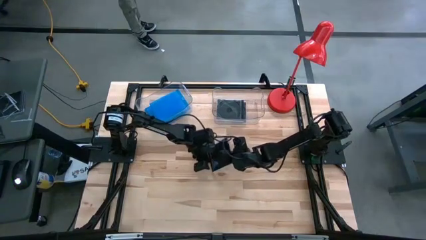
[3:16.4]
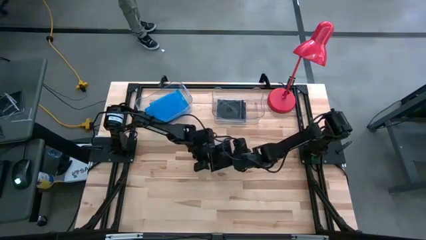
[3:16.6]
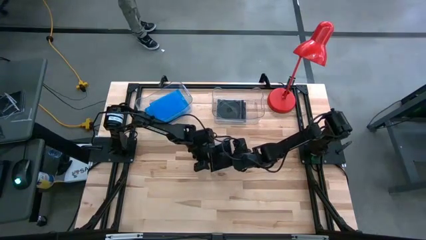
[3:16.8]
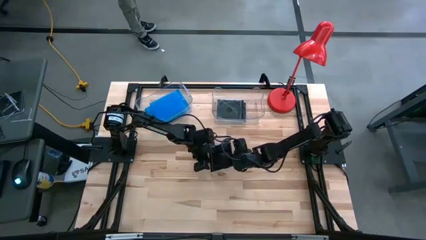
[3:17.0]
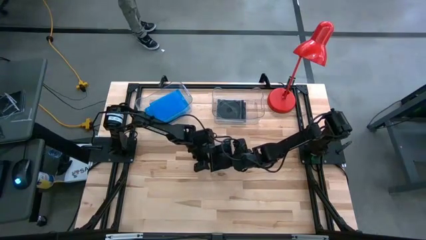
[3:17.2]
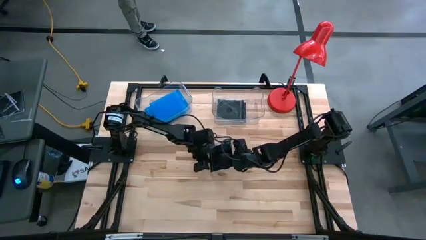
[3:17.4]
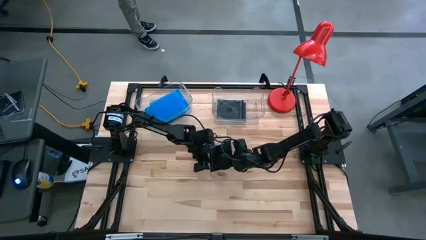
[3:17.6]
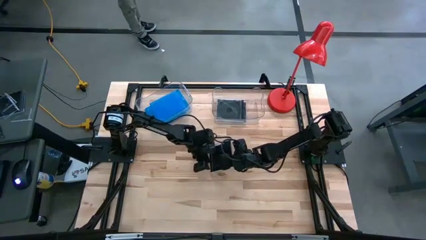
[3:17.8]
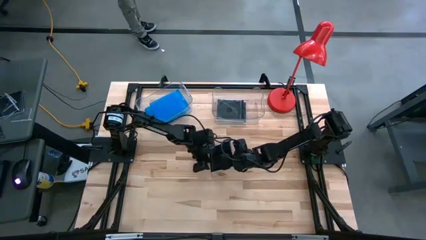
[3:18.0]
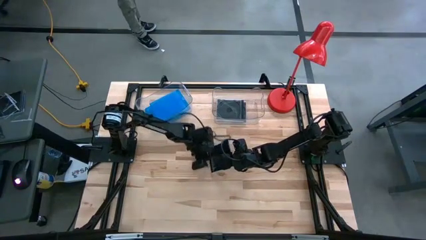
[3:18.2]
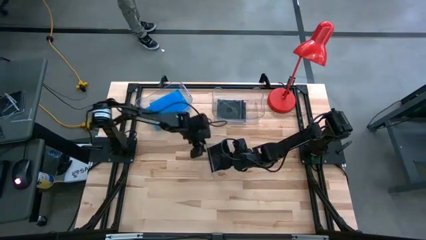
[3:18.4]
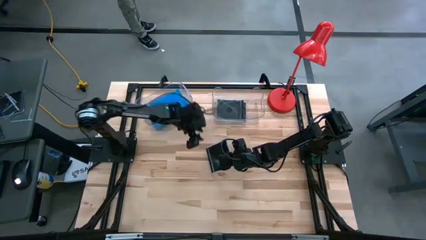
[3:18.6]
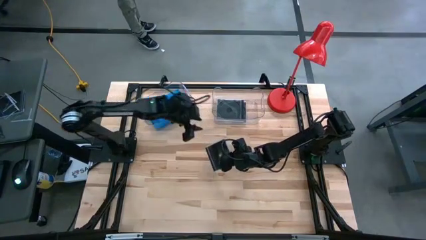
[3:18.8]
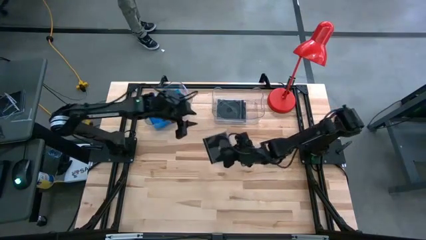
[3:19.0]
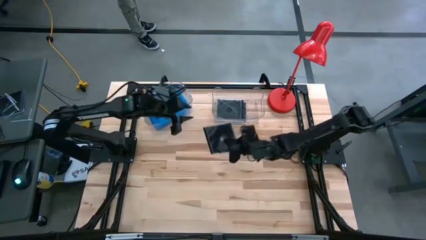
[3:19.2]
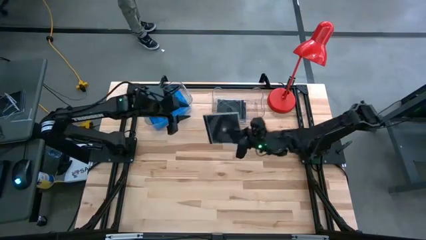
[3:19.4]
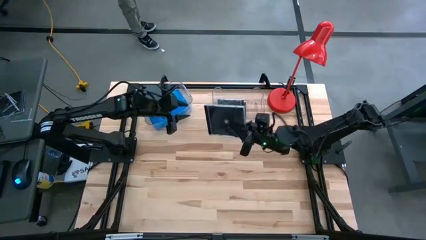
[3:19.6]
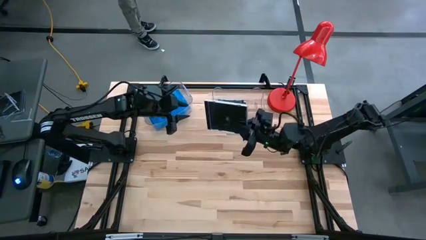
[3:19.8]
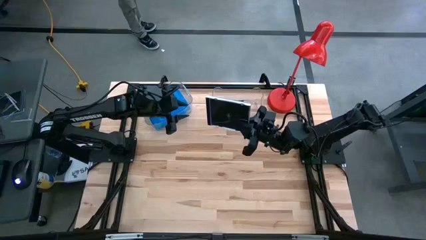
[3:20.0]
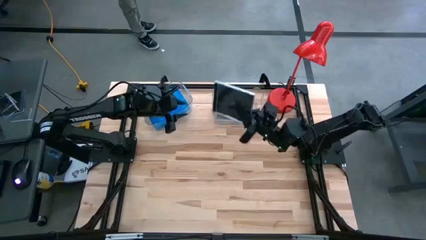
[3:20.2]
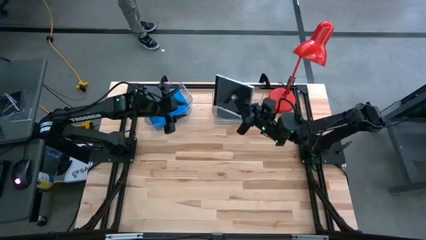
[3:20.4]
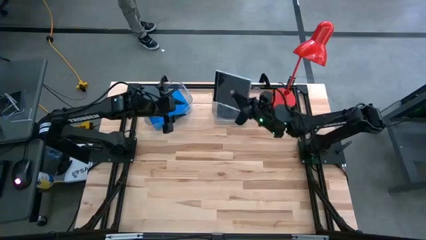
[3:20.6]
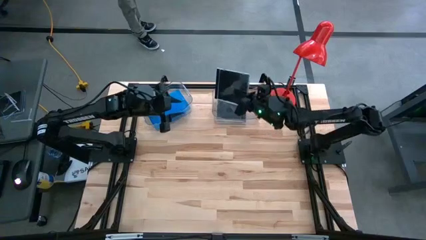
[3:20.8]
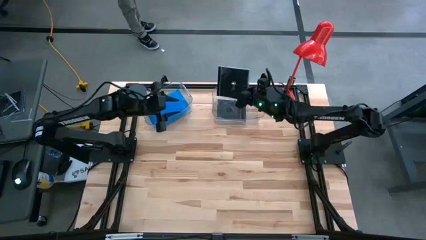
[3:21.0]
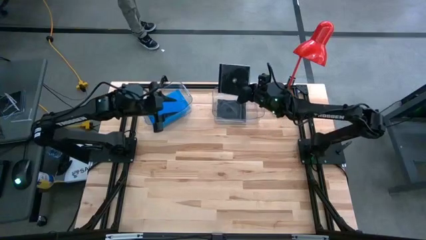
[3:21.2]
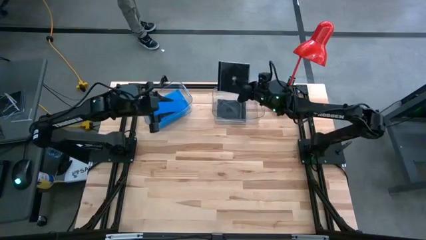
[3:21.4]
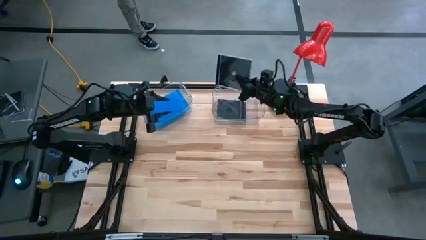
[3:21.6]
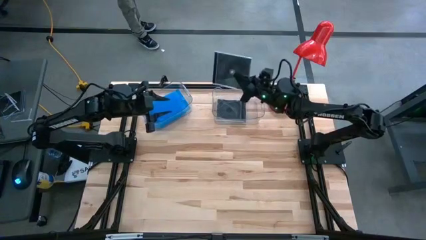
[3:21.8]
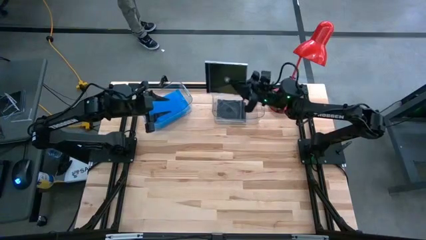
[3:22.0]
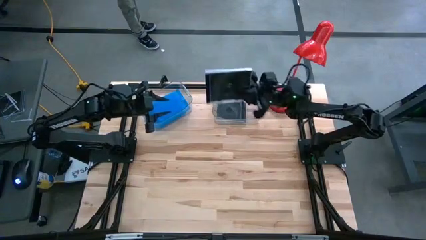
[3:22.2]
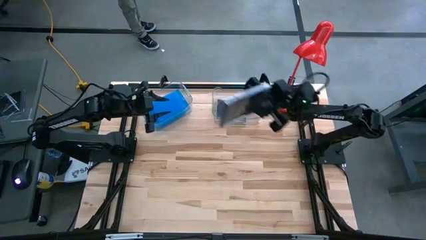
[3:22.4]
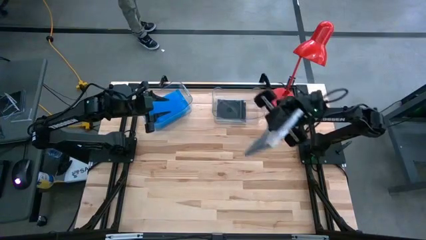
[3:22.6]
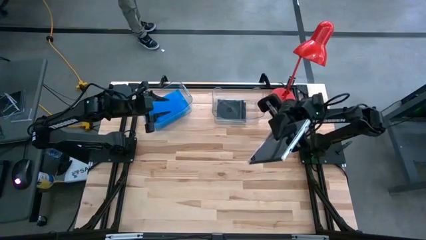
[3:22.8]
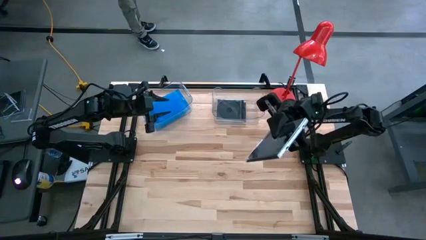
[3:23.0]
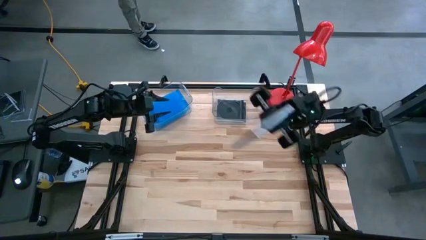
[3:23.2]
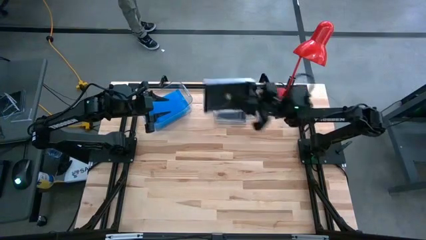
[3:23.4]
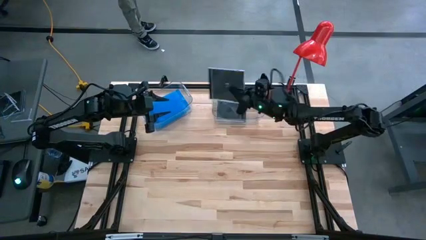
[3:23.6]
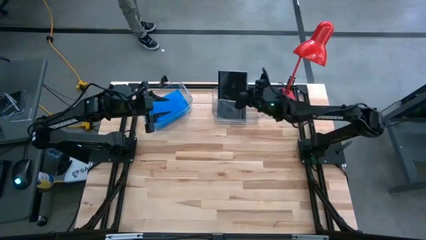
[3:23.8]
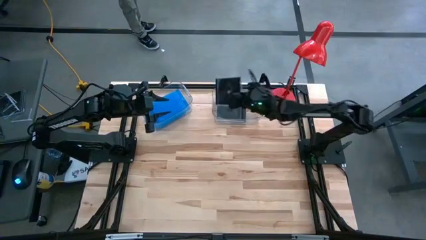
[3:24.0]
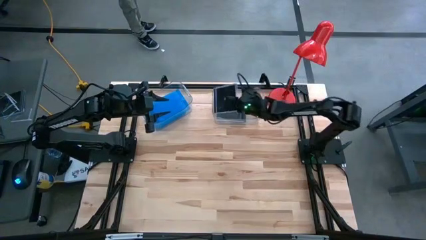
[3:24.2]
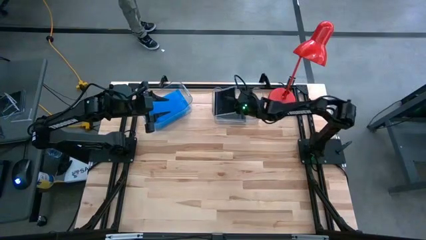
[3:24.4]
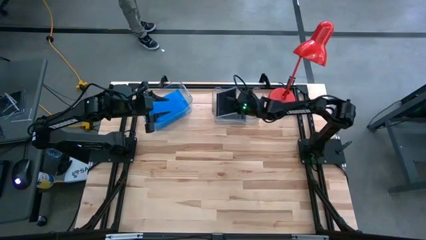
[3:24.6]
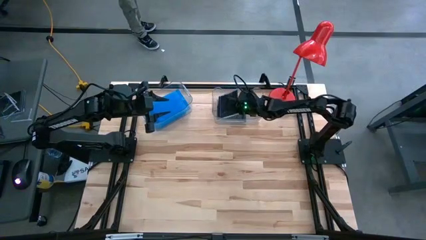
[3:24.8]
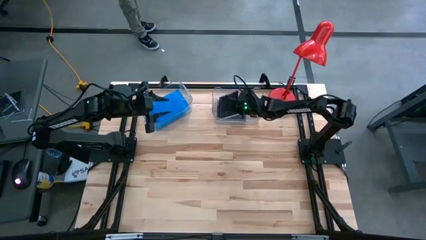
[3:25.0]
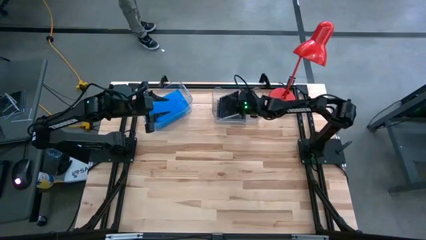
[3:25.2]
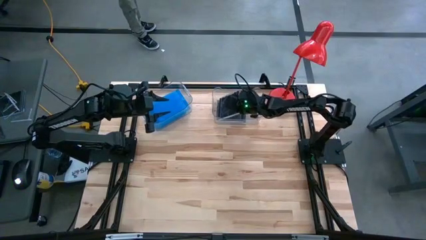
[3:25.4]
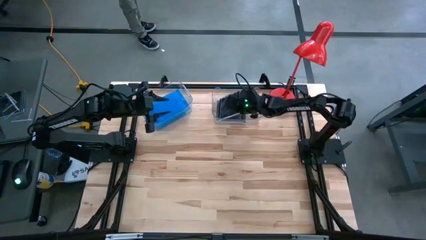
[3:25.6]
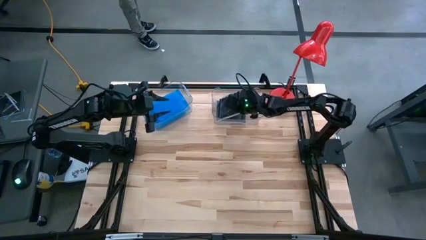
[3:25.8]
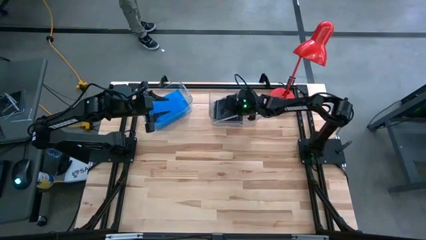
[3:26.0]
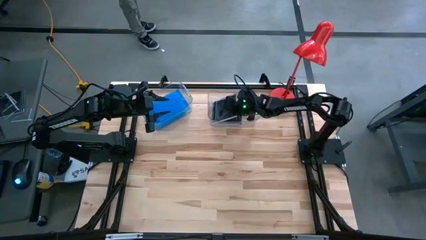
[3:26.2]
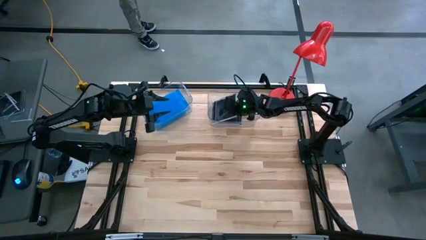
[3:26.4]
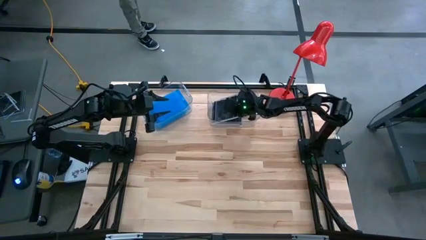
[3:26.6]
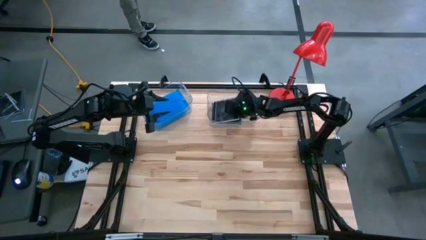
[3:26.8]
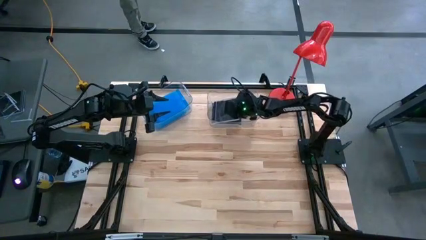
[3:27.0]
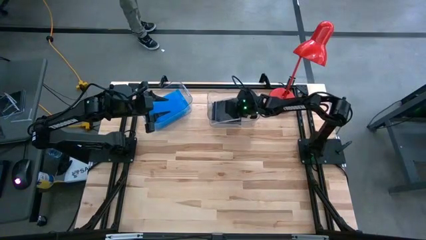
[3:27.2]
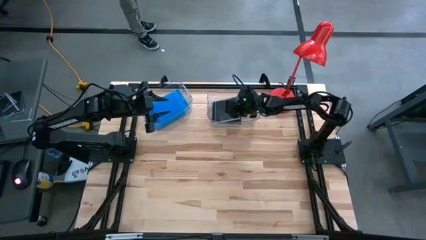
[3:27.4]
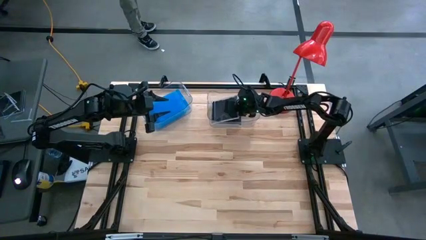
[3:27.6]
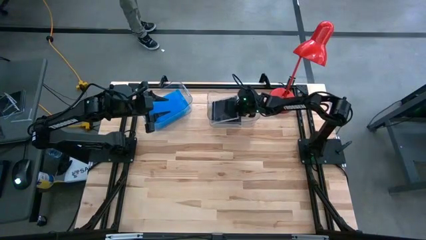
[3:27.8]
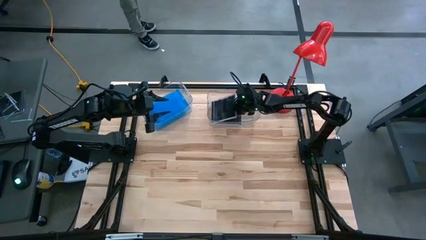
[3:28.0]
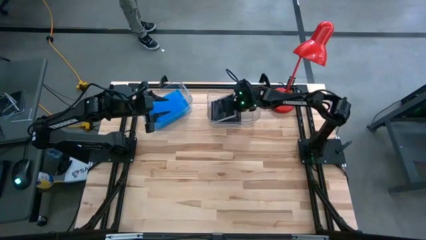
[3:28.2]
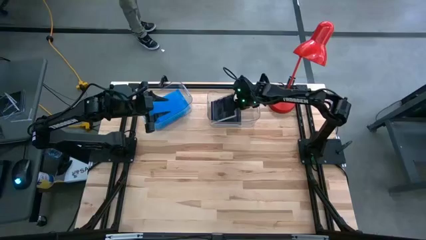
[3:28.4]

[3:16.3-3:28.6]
Task: Pick & place jewel cases by type
Put the black CD case into the right transparent bin

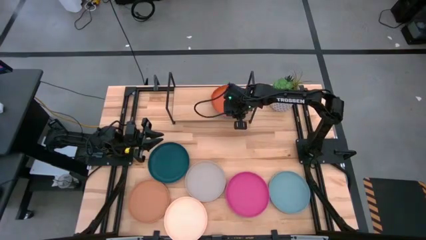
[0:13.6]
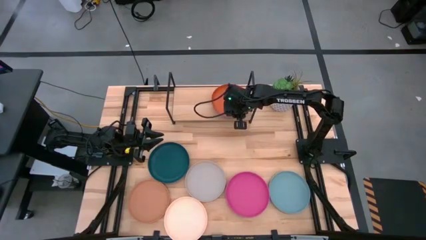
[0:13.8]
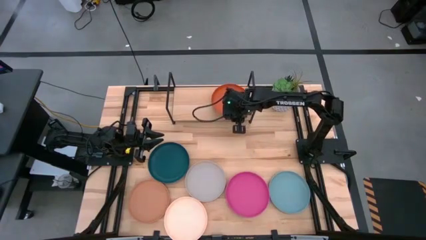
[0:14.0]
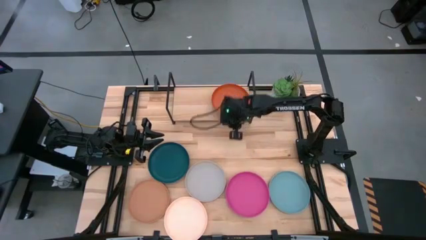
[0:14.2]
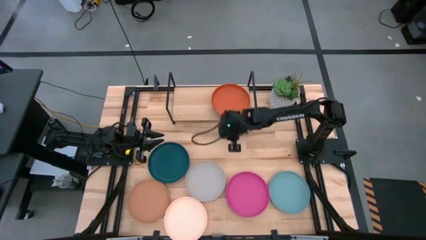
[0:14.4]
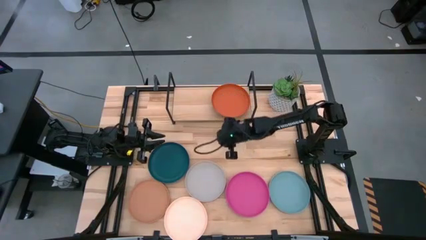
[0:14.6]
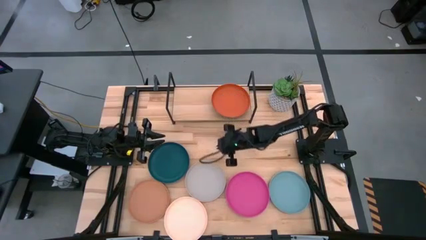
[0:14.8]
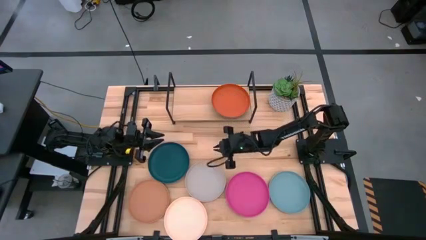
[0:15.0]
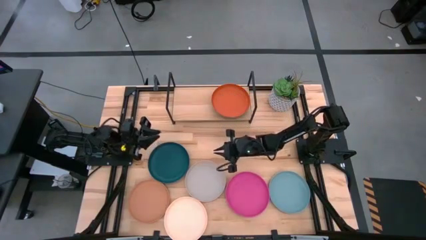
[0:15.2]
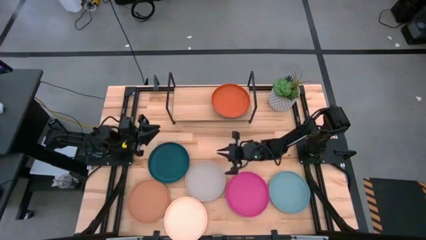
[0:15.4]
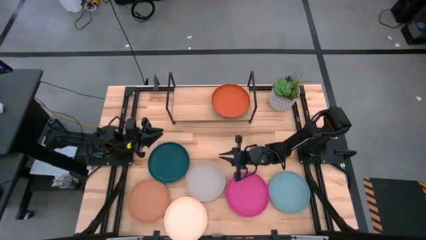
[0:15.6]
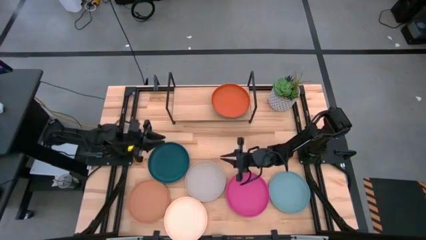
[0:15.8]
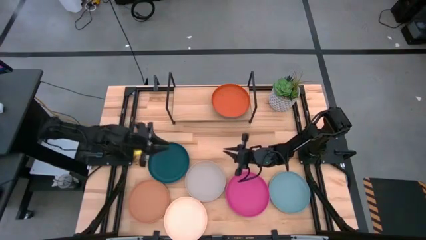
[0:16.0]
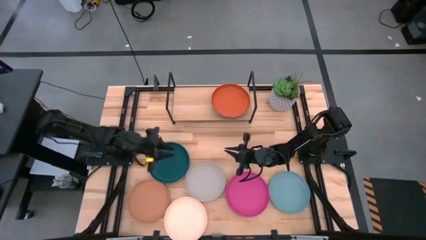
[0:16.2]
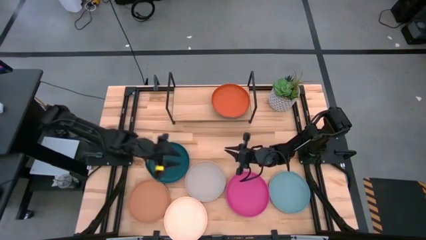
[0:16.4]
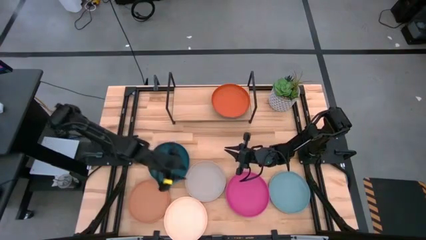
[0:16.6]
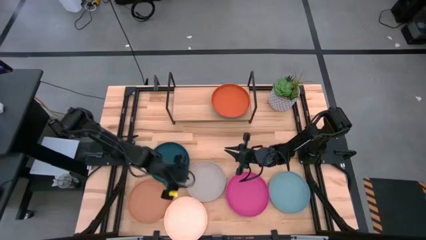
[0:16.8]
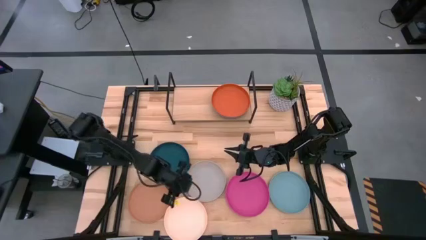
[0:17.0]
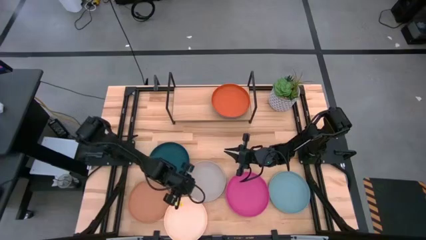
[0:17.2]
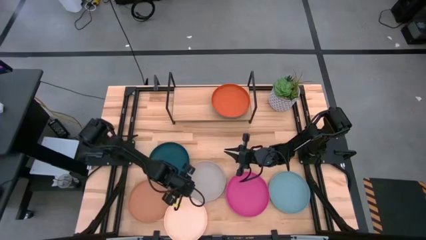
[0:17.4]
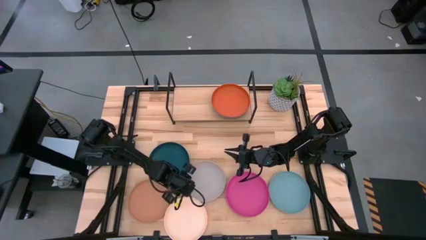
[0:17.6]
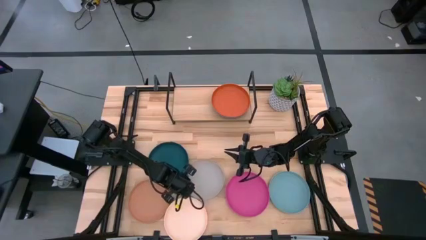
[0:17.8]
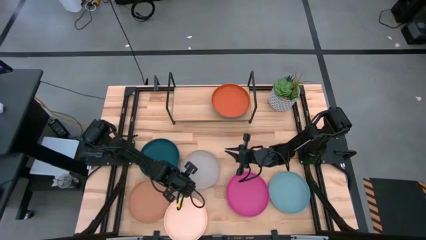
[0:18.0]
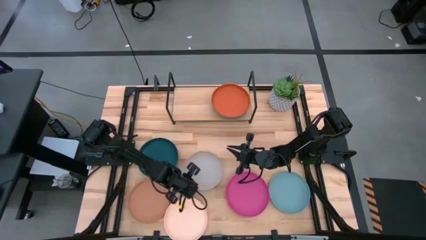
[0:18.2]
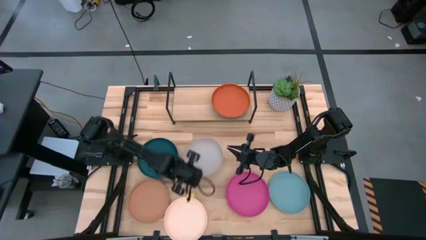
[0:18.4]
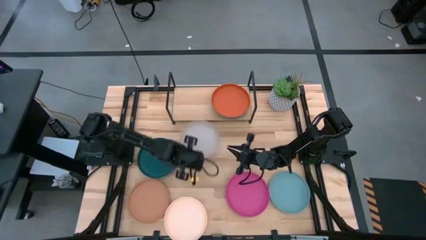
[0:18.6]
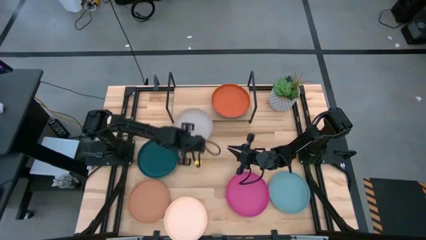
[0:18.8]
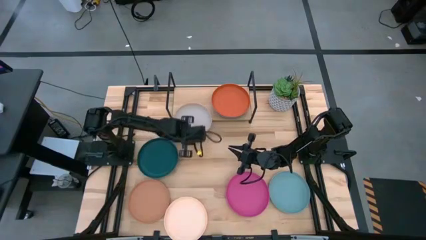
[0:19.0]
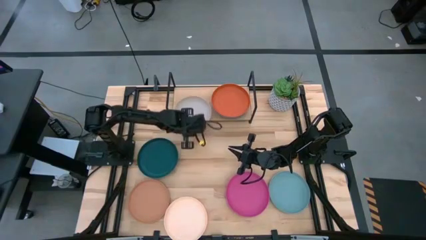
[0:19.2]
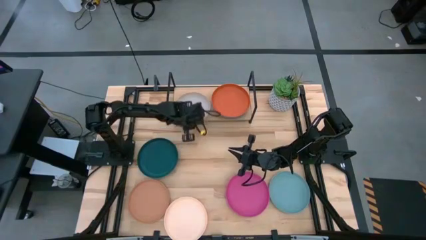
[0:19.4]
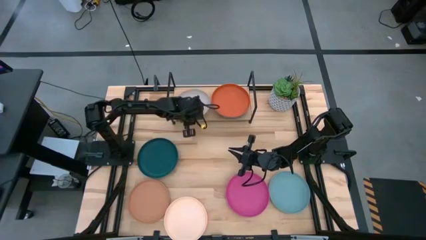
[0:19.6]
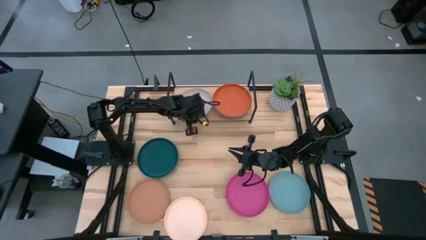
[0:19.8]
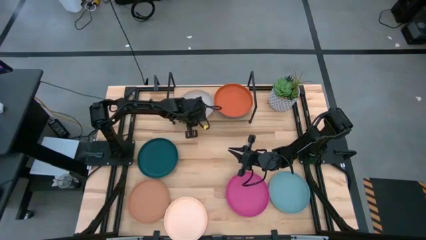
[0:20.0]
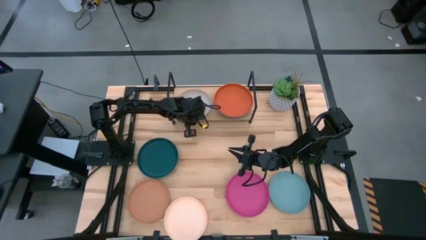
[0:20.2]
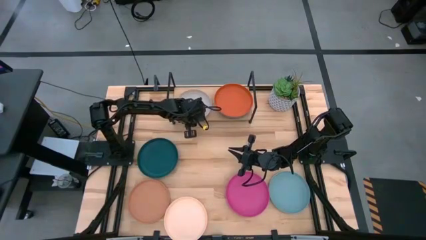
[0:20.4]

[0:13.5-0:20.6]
Task: Place and stack plates onto a shelf
Put the gray plate on the shelf
